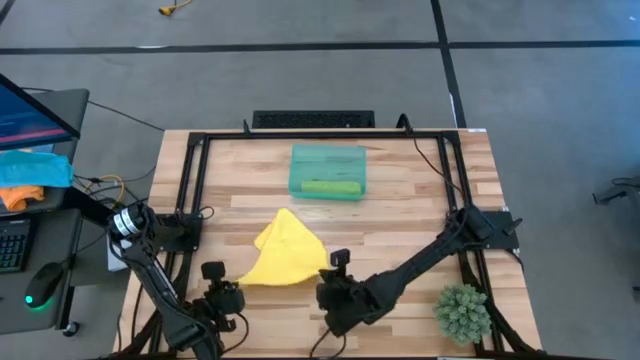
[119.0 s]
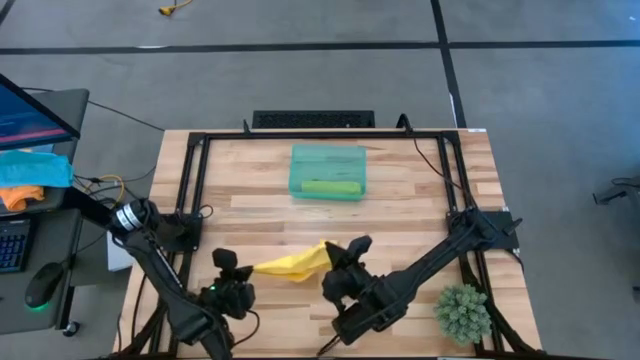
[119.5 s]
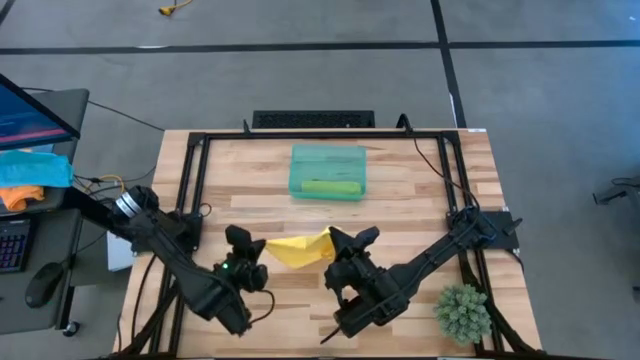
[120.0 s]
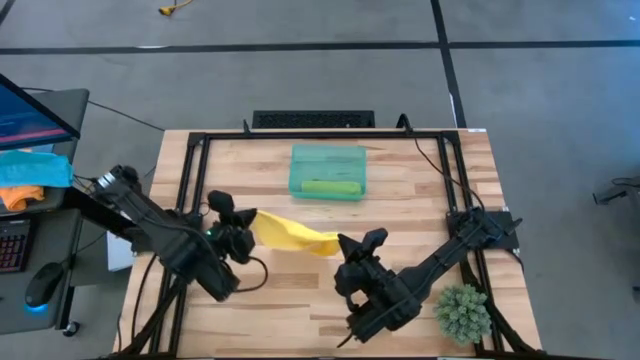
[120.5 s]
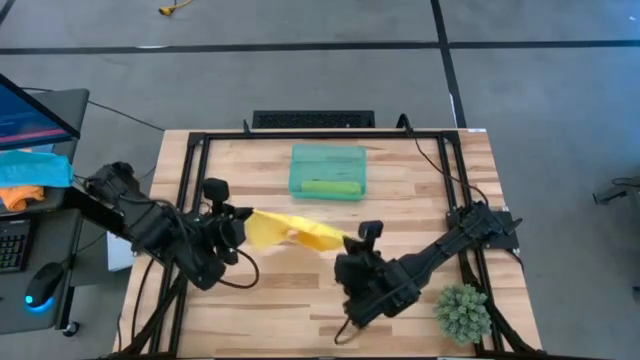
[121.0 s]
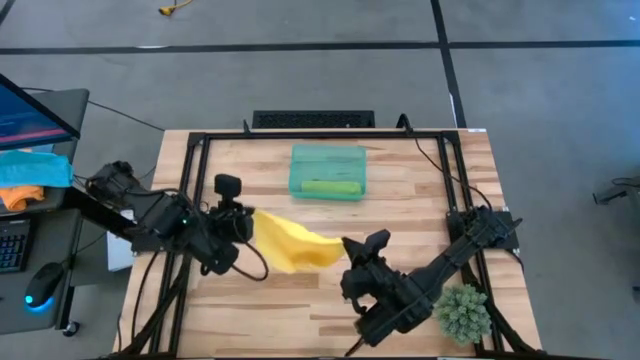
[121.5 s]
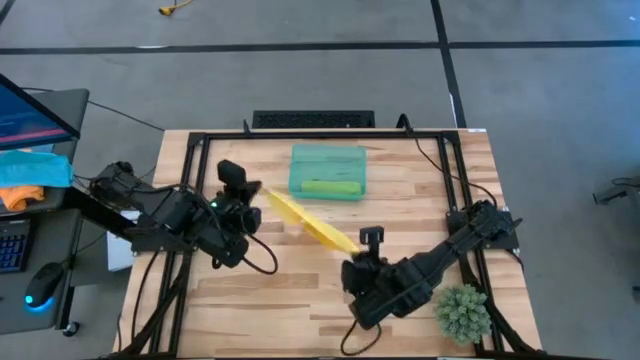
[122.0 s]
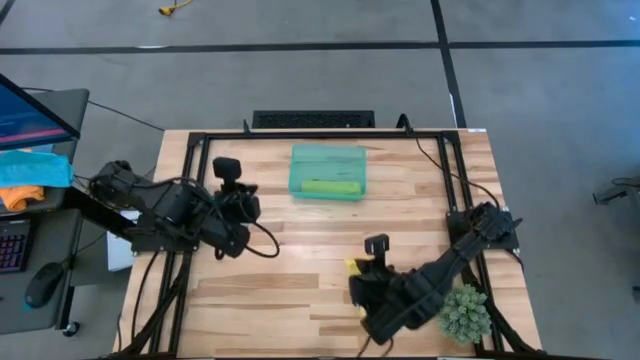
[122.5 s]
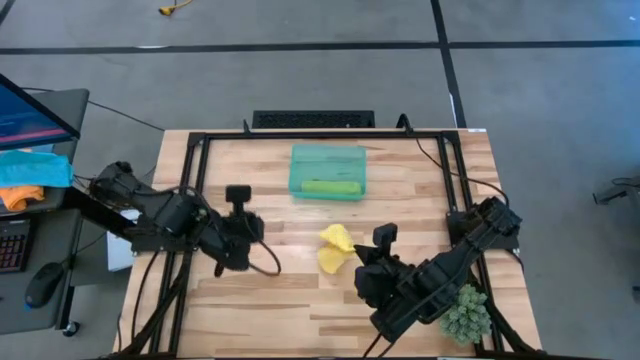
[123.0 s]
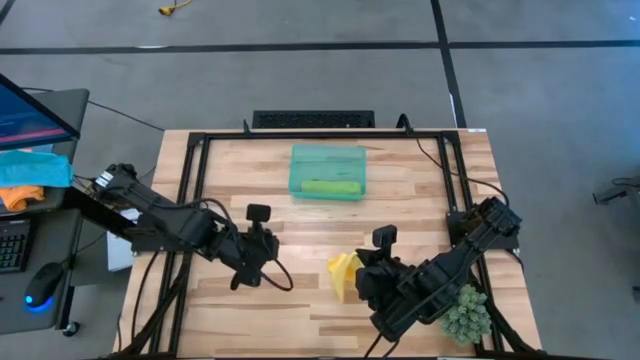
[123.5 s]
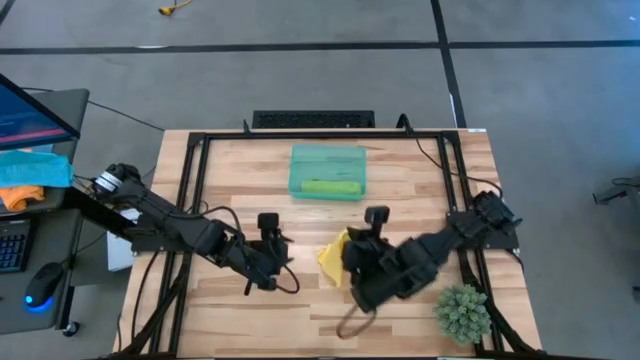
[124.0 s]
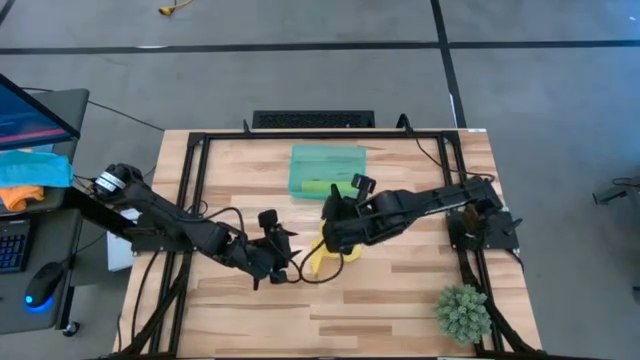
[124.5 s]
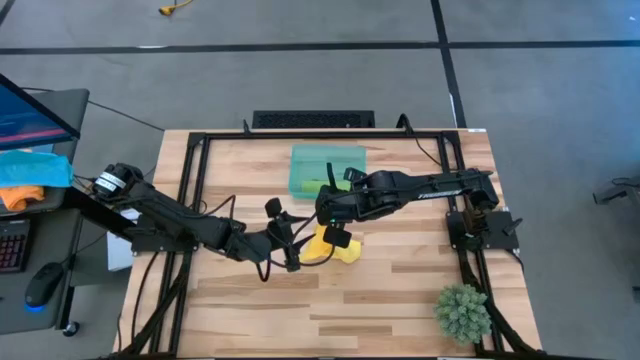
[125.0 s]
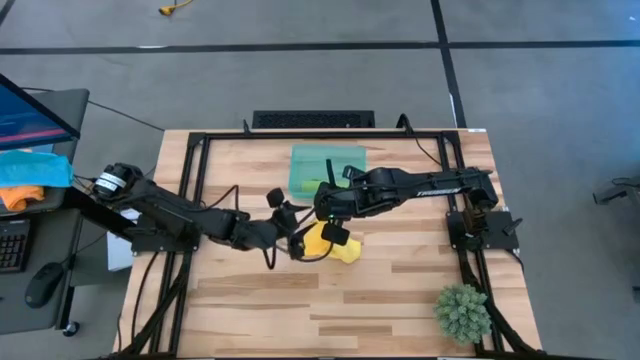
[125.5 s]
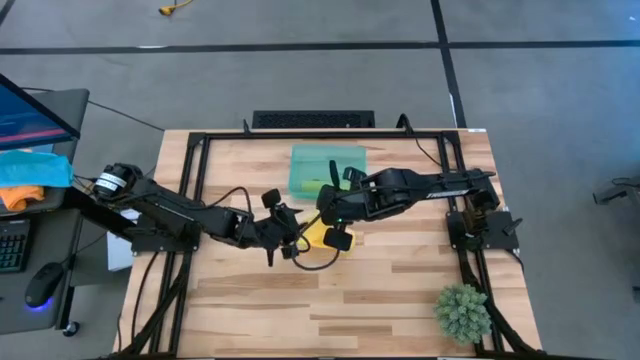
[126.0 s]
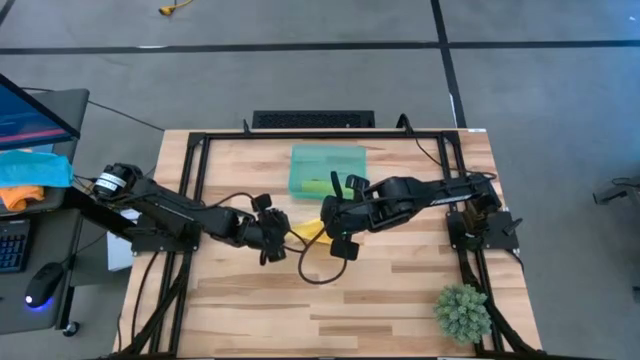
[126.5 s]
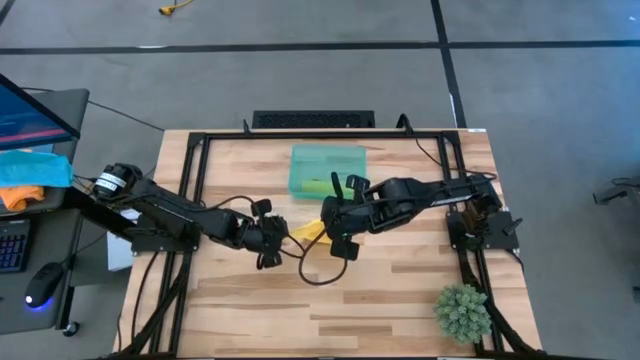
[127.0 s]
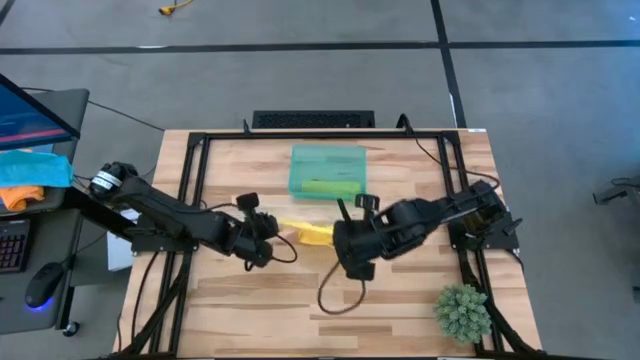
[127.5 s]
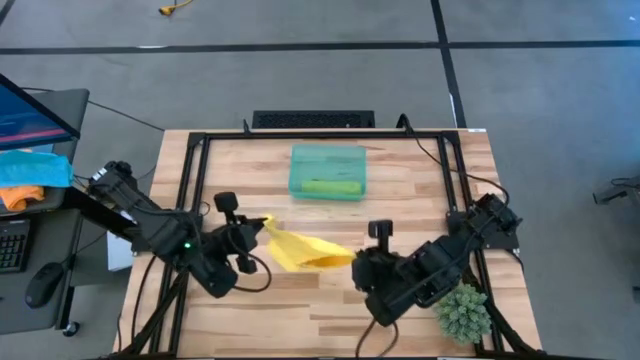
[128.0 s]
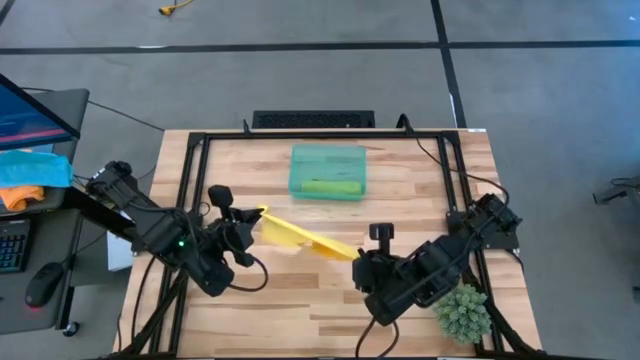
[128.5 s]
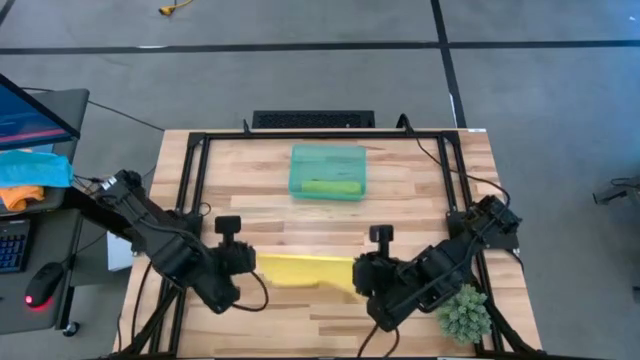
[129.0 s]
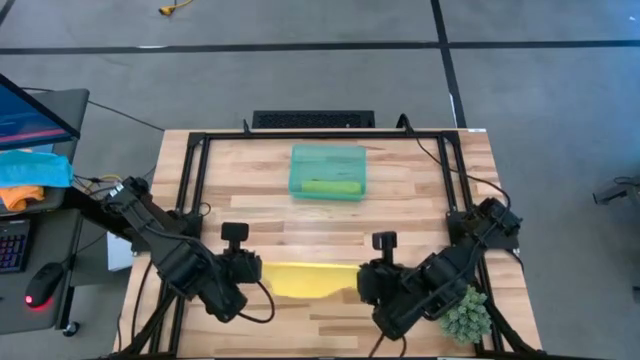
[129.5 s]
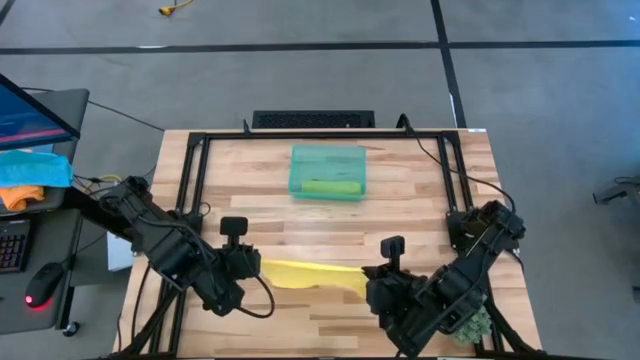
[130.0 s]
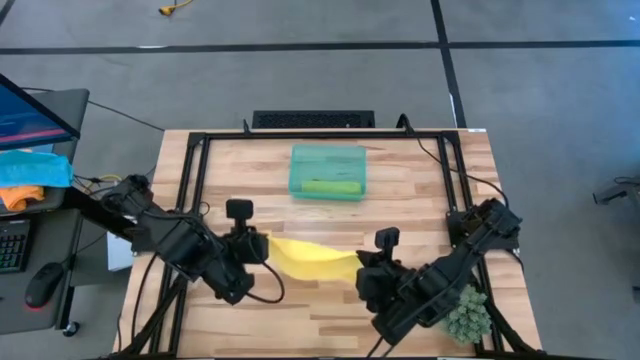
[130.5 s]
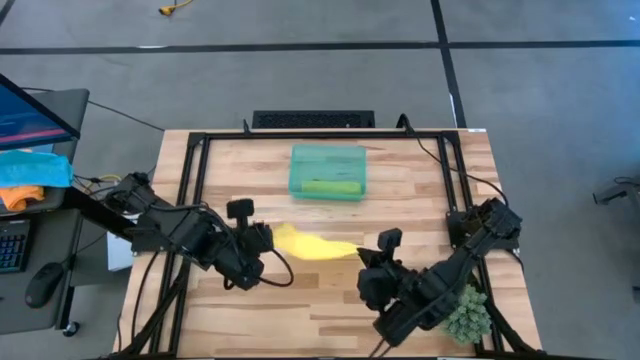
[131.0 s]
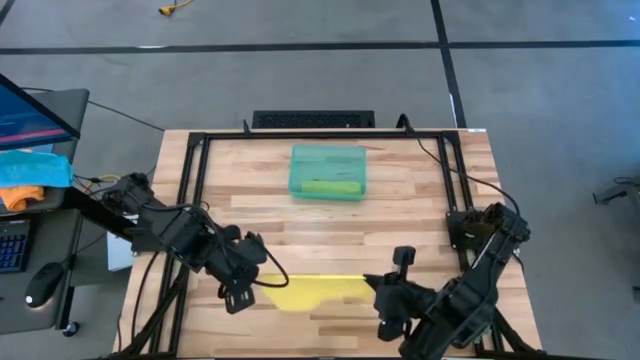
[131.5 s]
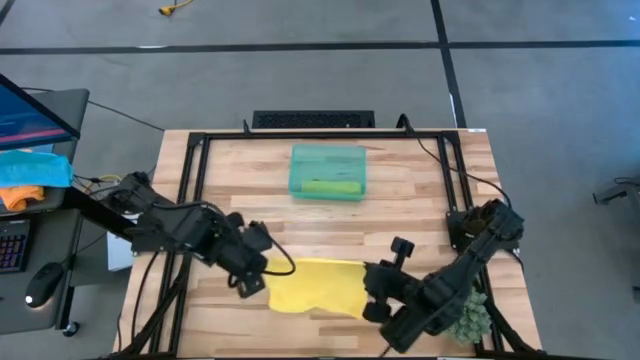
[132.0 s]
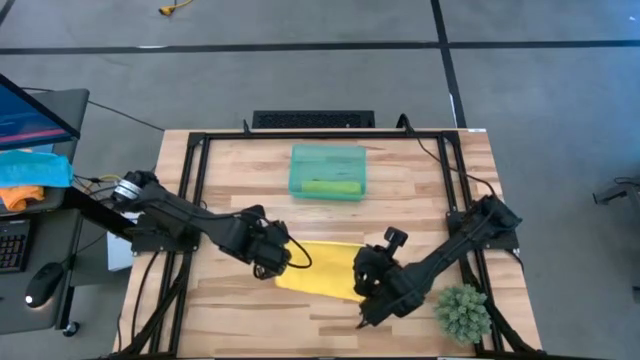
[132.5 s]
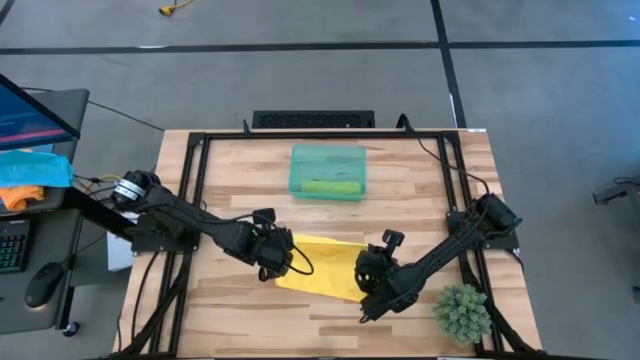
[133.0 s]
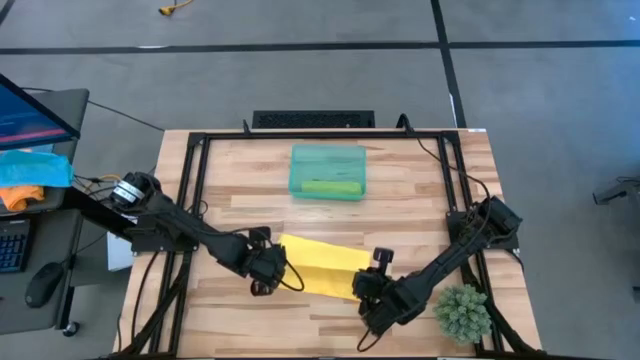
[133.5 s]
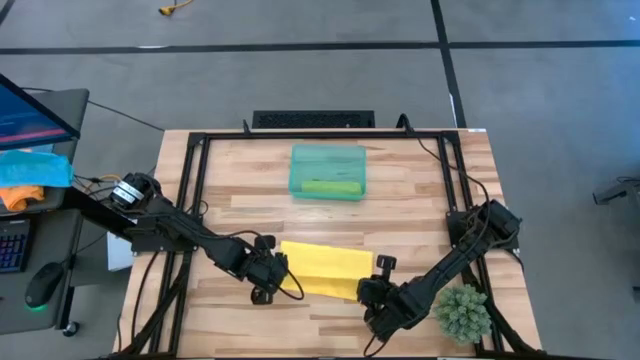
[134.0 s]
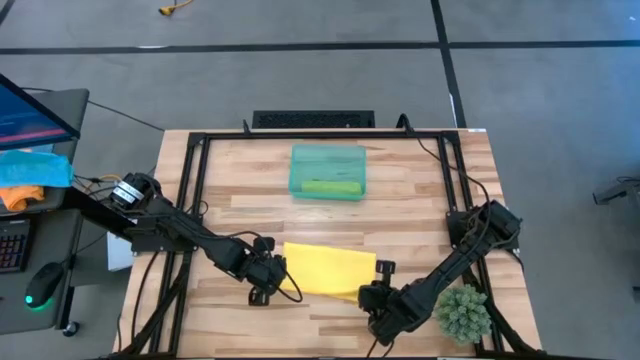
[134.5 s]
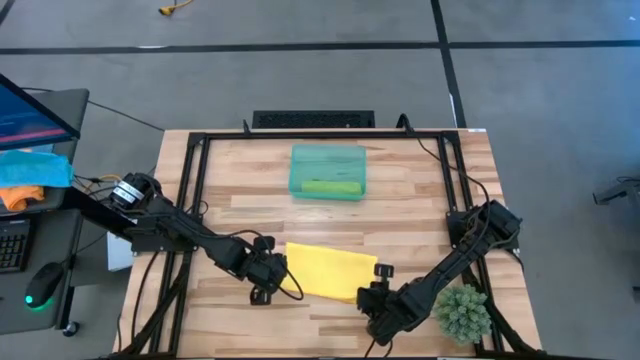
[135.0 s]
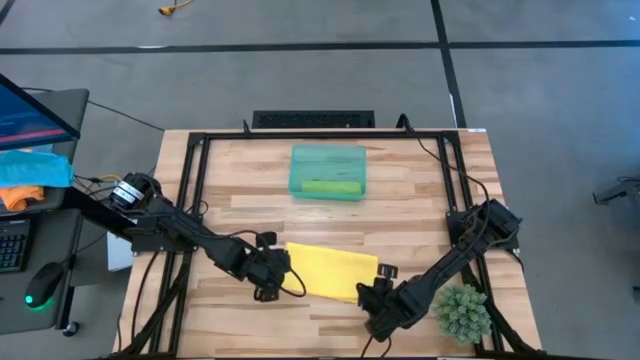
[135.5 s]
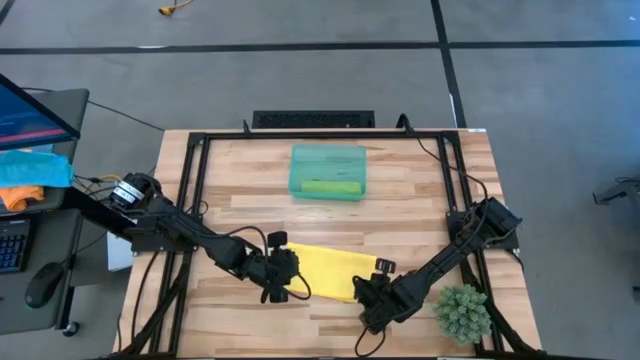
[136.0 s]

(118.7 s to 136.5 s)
Task: Roll microfiber towels into tight, uniform cylinder then place into a basket
Fold the yellow microfiber towel

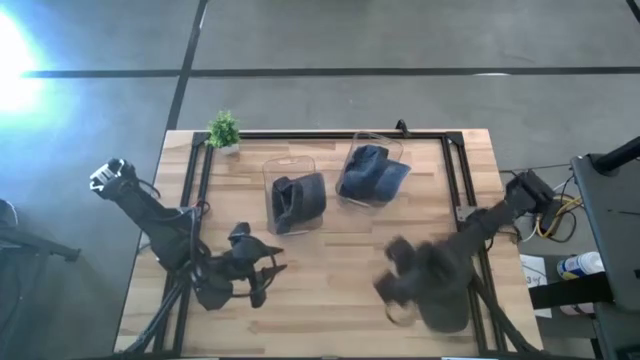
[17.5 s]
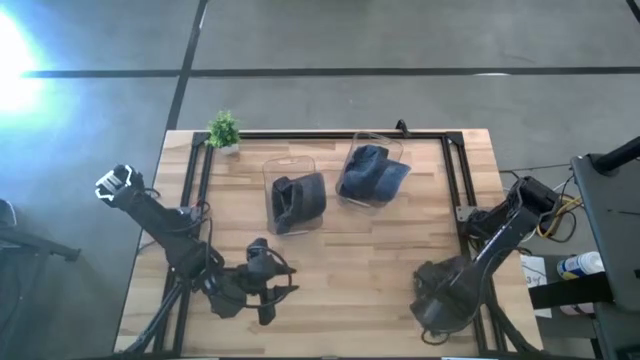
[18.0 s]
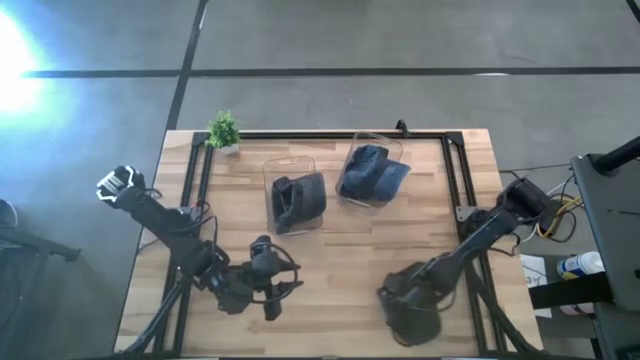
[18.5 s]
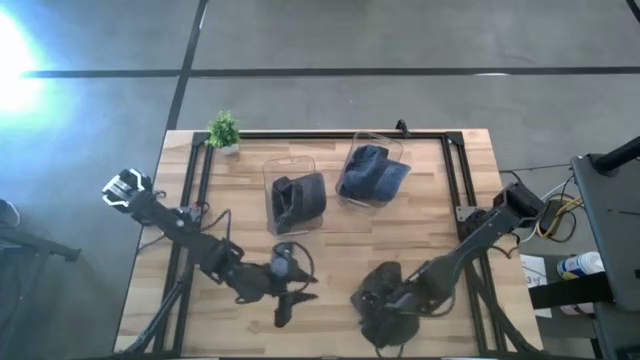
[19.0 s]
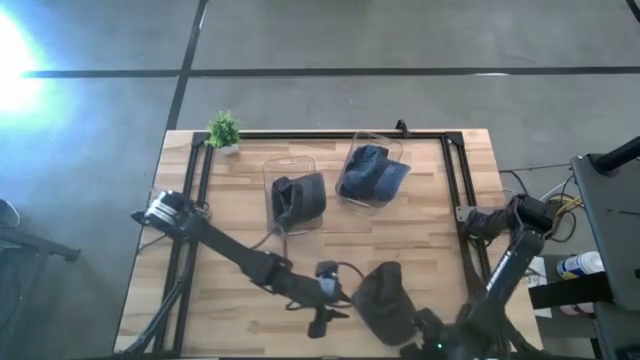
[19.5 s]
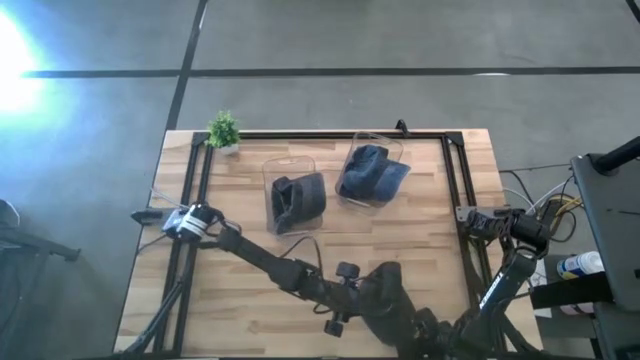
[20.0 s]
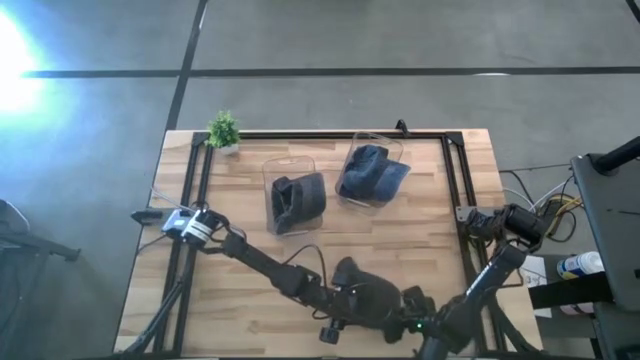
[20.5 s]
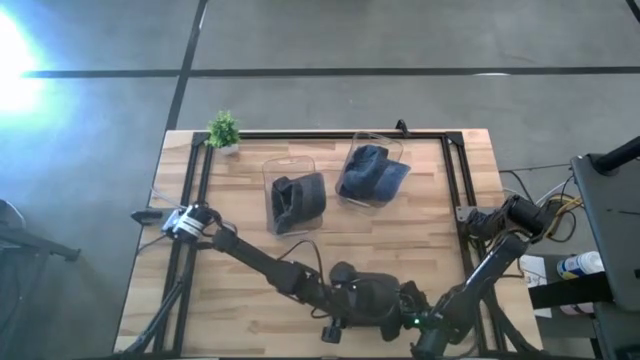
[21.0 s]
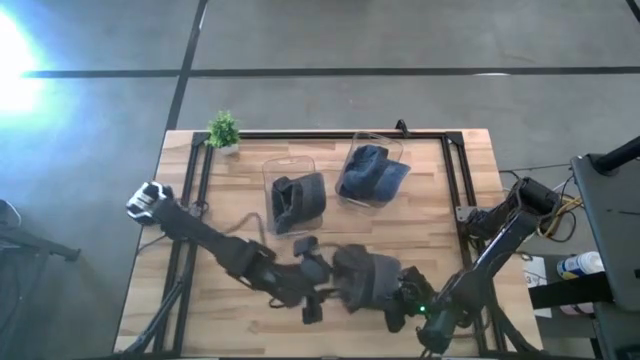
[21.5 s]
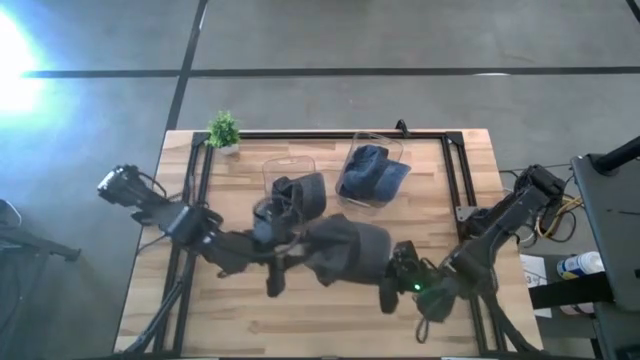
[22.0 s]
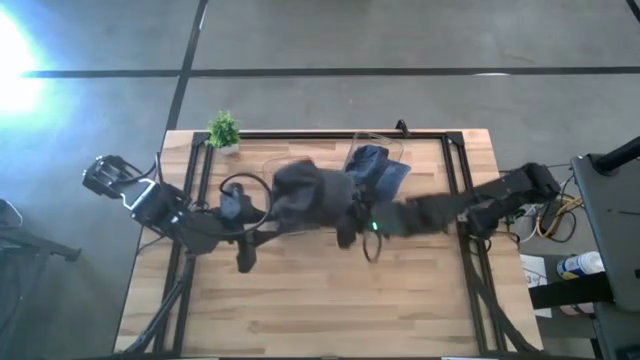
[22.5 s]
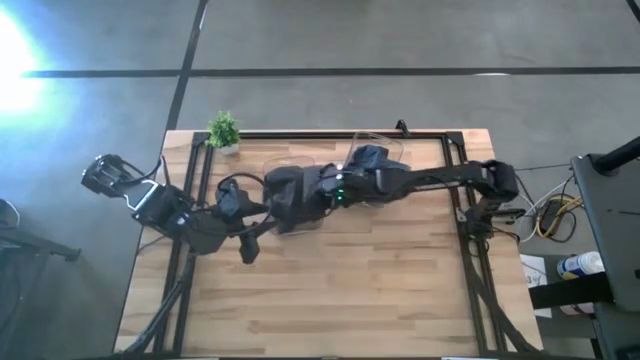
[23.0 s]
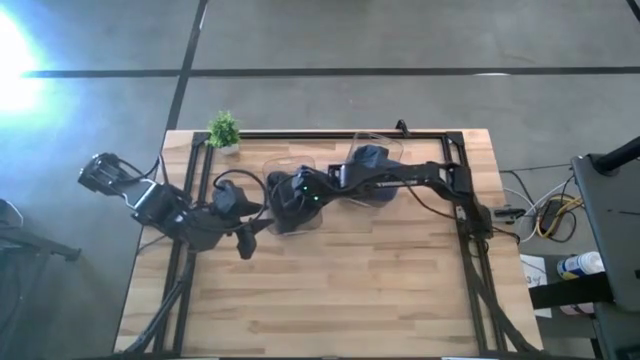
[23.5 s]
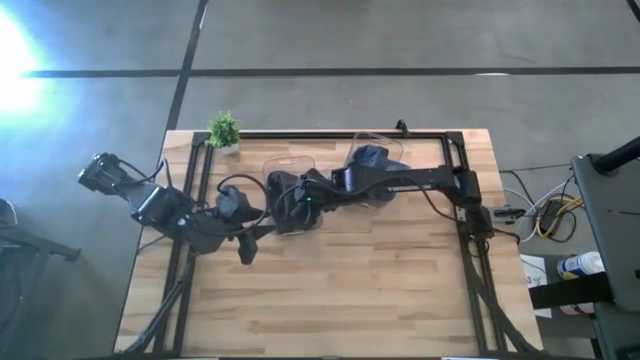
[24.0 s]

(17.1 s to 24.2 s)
Task: Pick & Place hat
Put the black cap into the left transparent bin
